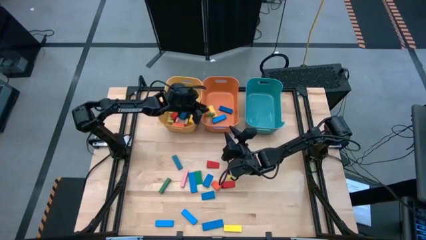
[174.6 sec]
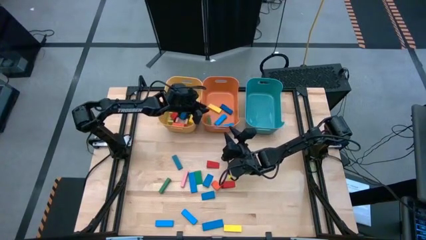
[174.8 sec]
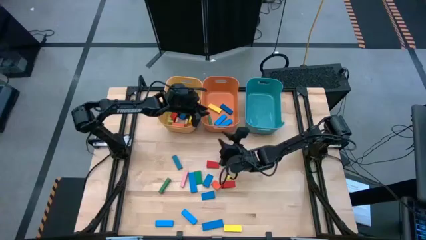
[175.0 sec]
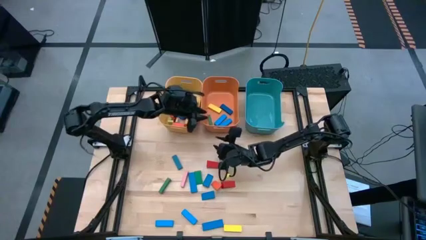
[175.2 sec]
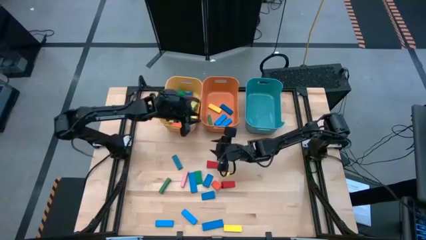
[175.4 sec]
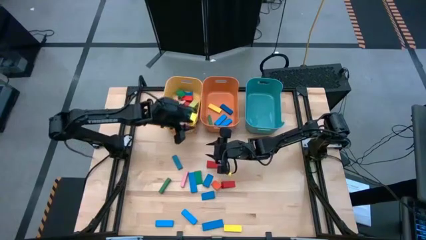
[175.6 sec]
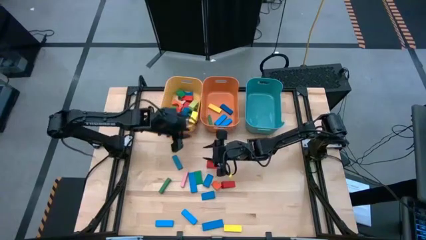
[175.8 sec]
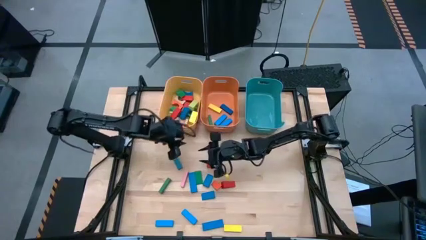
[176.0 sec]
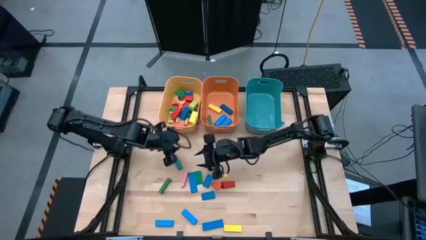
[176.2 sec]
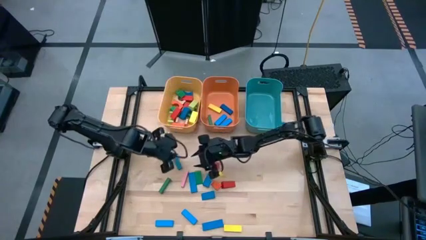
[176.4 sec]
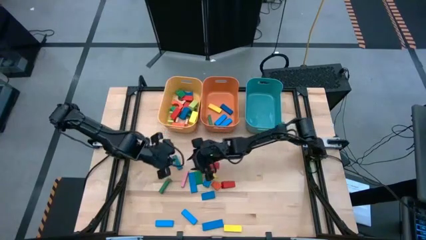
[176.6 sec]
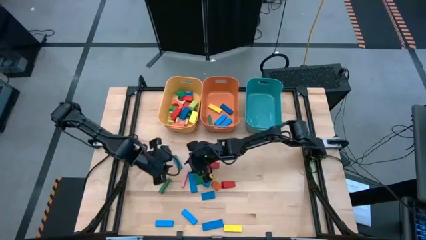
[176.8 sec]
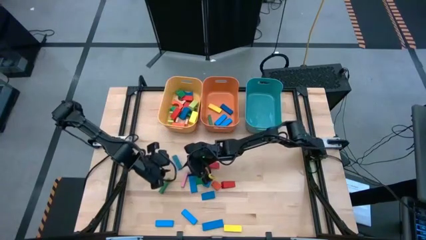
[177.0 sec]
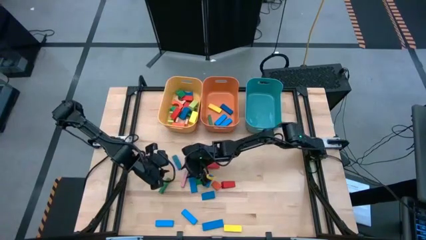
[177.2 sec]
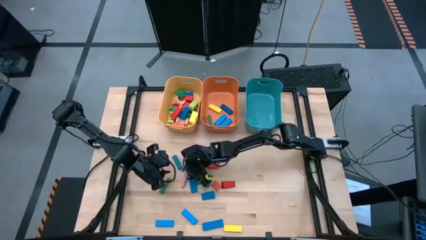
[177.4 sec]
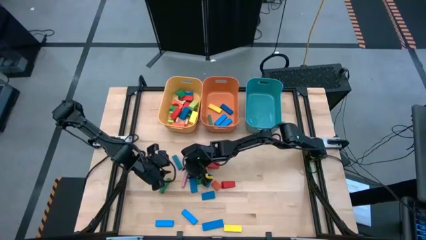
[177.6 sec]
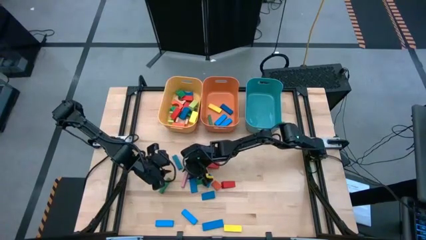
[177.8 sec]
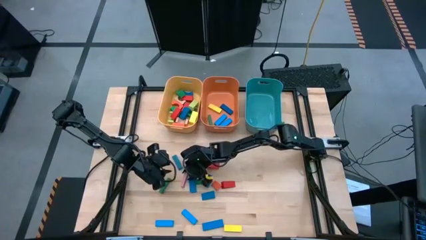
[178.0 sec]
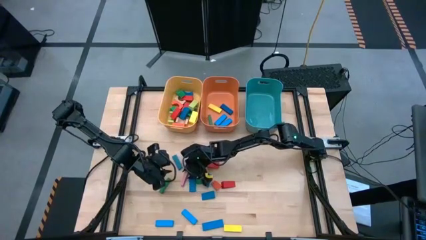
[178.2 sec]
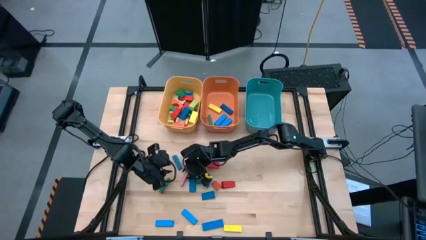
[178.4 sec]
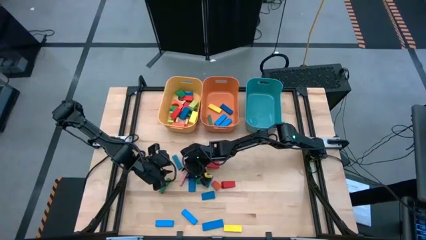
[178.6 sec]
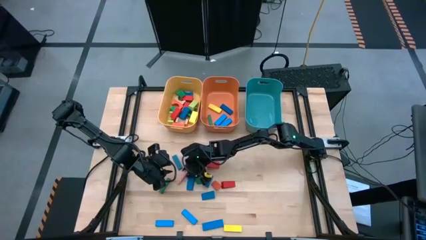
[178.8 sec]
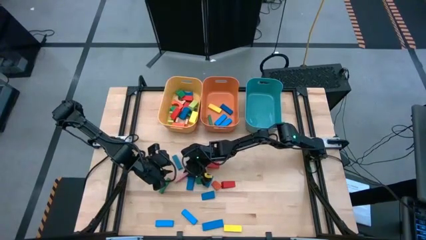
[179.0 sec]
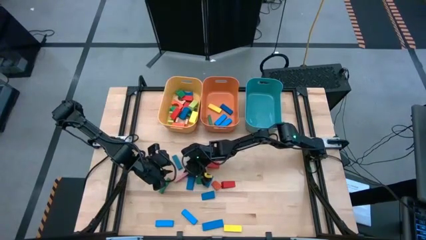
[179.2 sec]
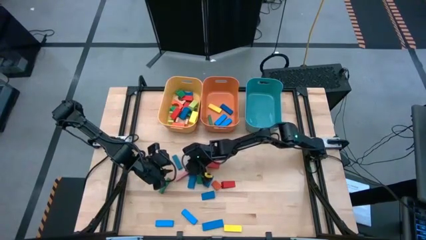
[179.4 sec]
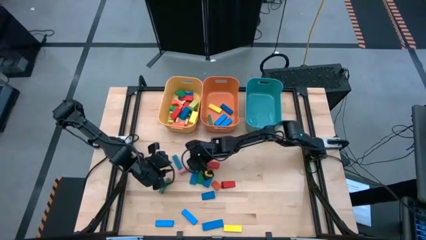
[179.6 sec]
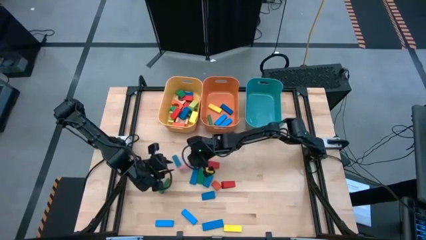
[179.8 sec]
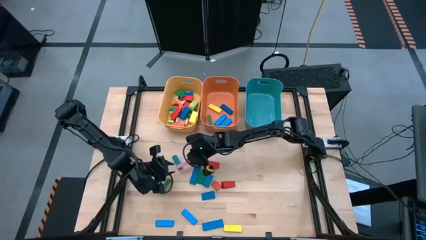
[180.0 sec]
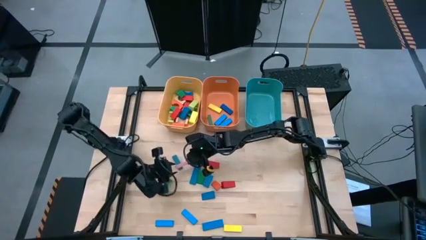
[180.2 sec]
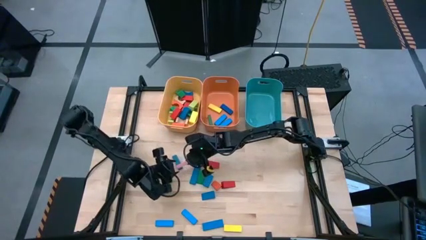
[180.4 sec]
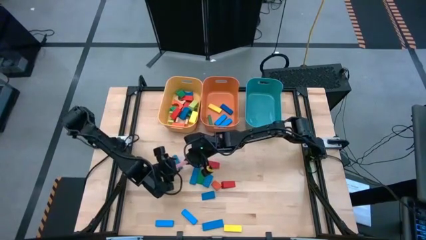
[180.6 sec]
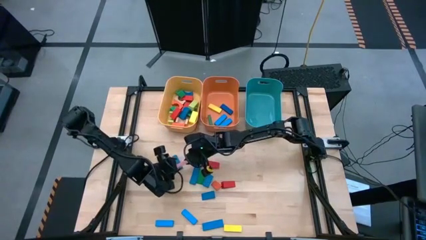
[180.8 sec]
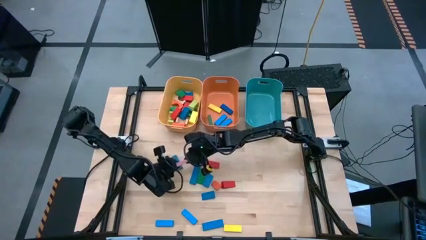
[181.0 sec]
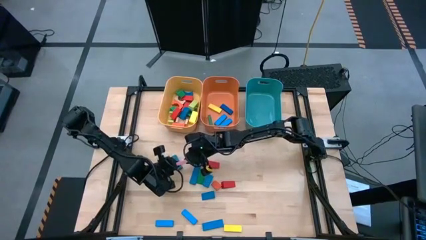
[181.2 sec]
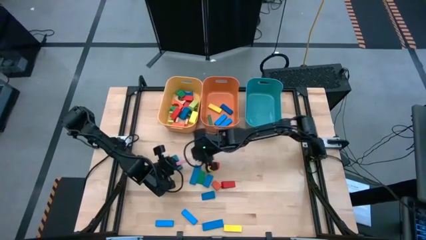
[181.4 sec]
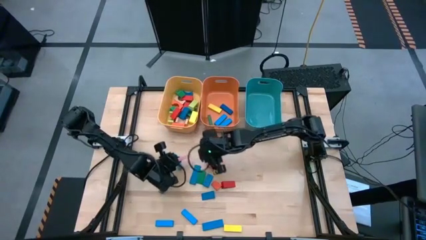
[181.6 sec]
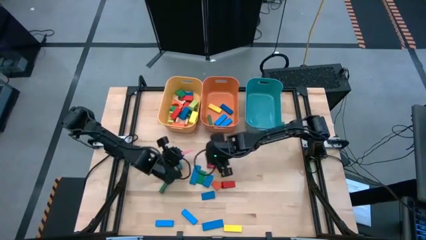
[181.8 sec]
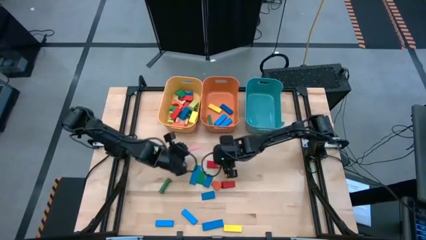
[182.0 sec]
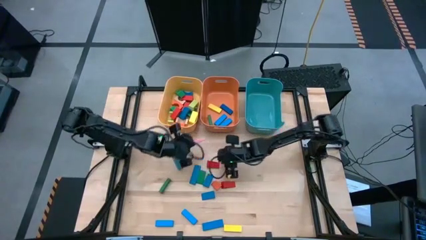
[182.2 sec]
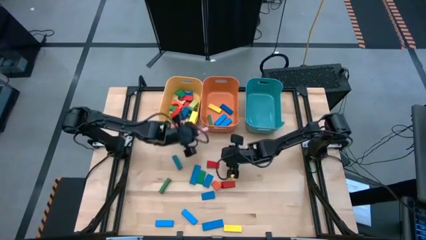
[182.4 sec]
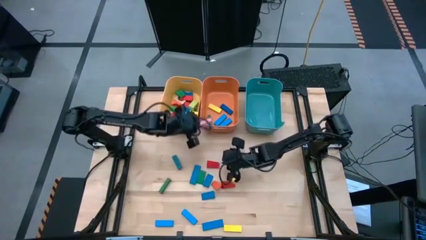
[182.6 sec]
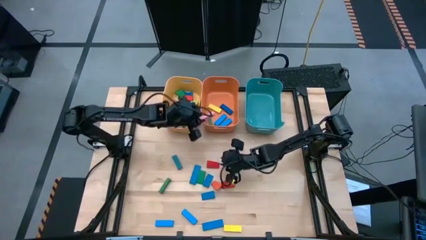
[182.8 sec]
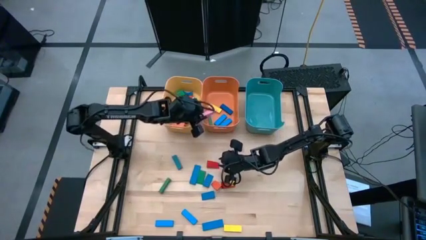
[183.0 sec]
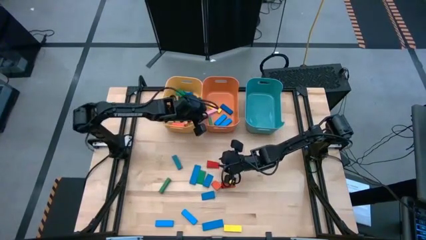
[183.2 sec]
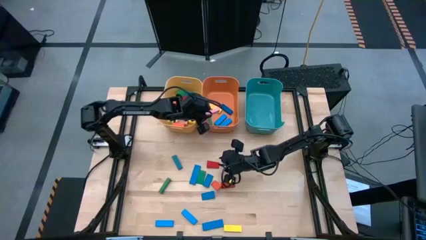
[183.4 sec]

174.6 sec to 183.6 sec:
Task: Sort blocks by size
Put the pink rectangle block into the orange bin

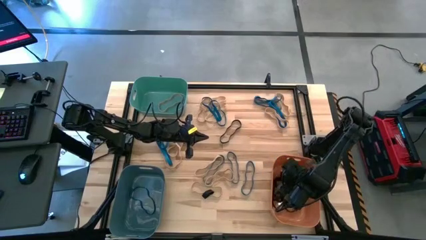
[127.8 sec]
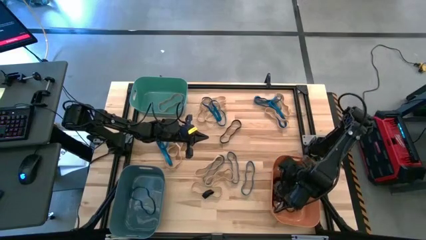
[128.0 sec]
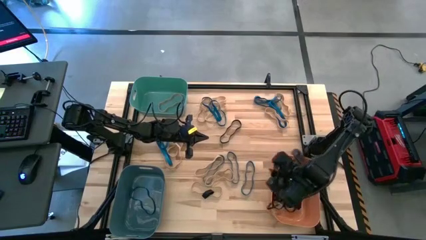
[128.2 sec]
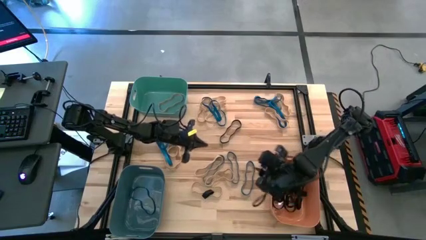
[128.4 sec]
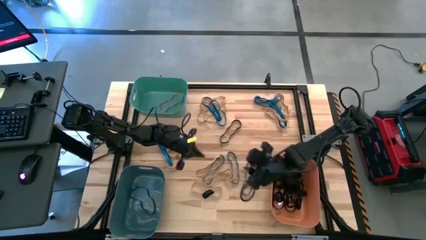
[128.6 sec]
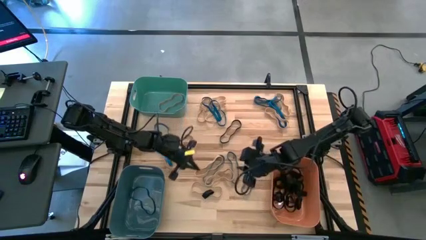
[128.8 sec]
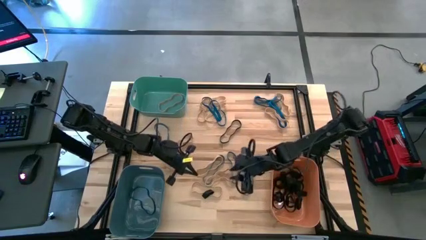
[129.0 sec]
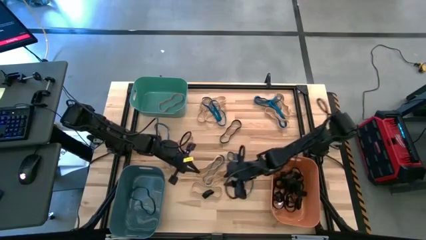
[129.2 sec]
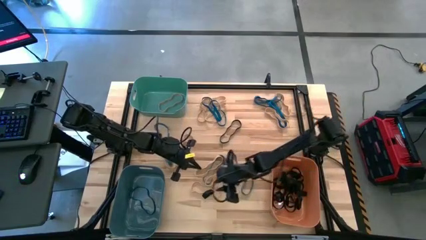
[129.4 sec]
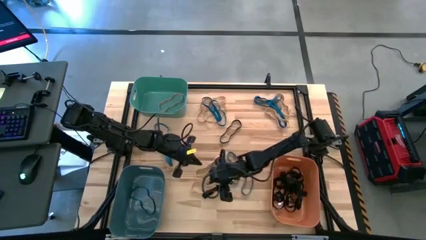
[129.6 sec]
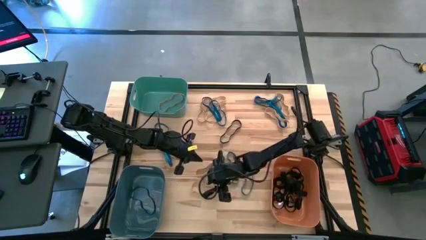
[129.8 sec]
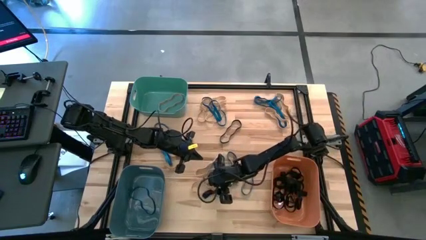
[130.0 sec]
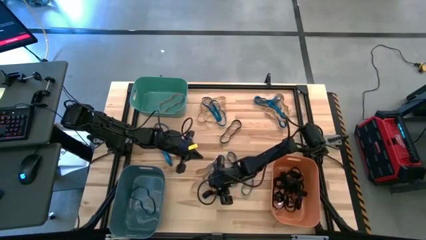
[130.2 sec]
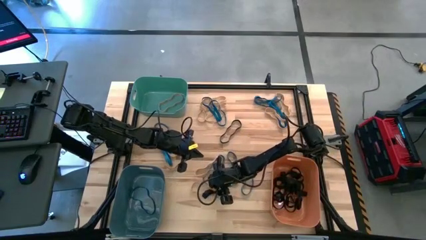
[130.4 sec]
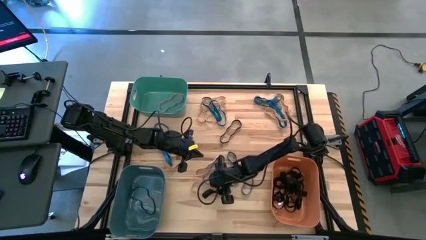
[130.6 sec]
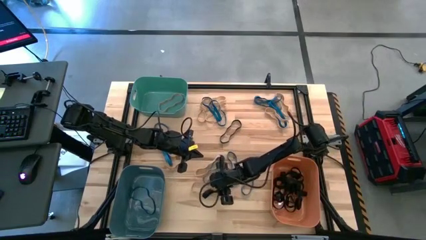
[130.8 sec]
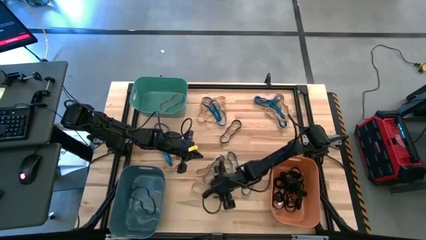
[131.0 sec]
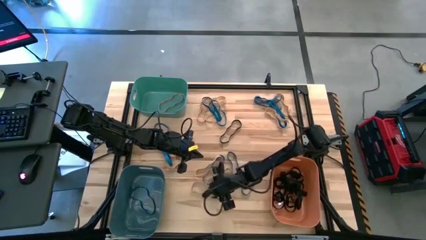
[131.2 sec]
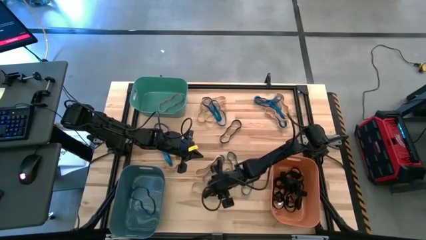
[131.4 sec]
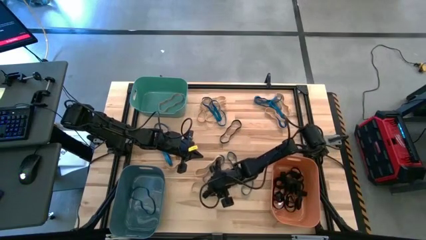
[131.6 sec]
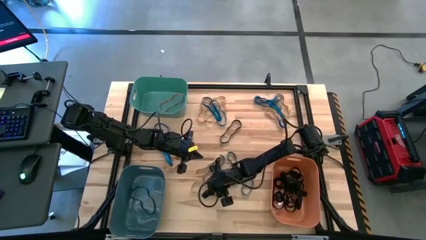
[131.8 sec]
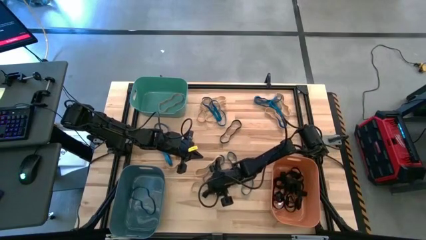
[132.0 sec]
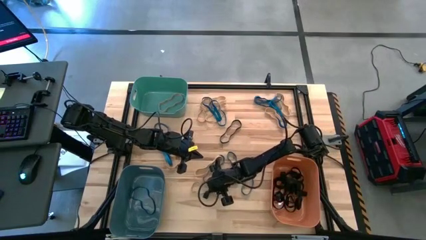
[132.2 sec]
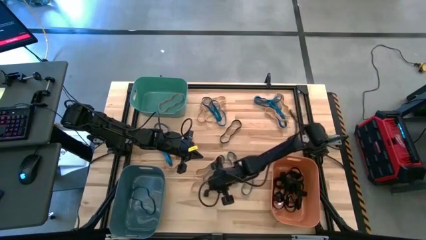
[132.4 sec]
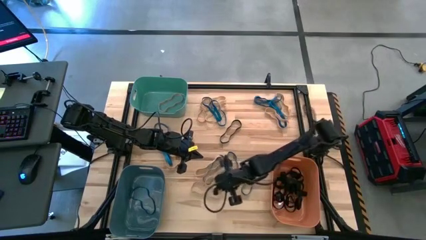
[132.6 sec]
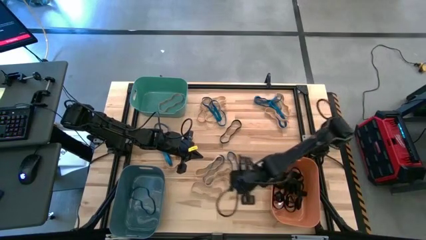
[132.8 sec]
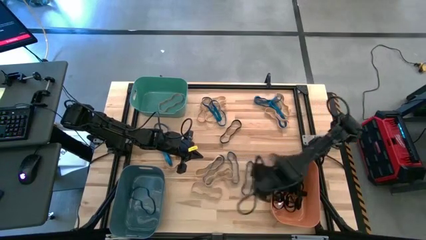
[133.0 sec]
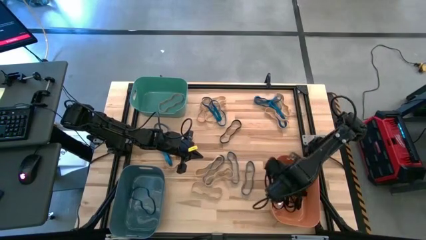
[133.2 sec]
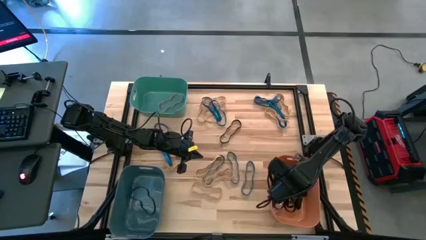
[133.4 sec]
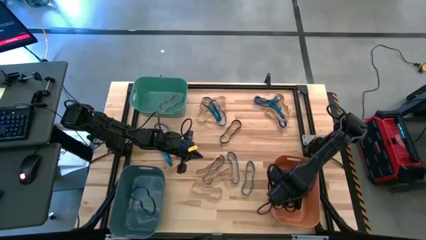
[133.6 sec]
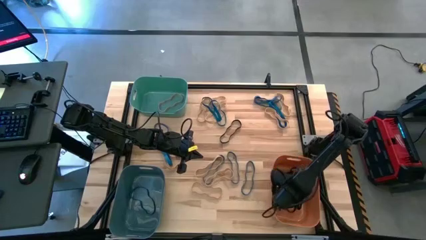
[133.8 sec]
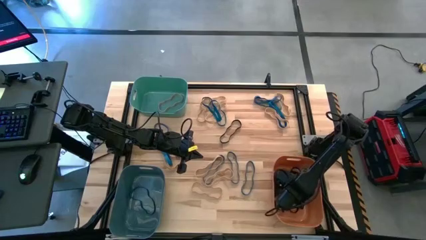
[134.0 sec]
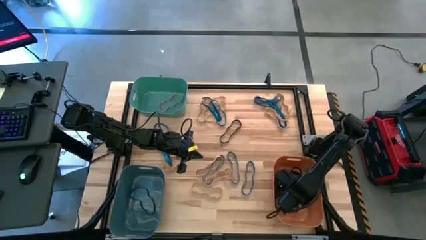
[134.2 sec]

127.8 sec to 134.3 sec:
Task: Sort rubber bands into baskets
Put the black rubber band into the orange bin
